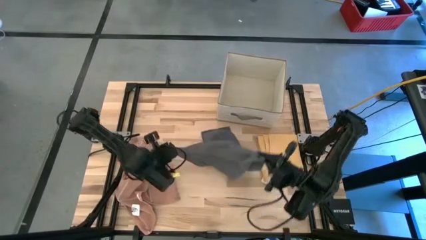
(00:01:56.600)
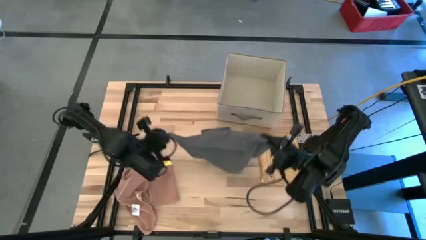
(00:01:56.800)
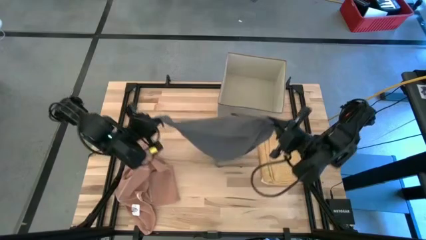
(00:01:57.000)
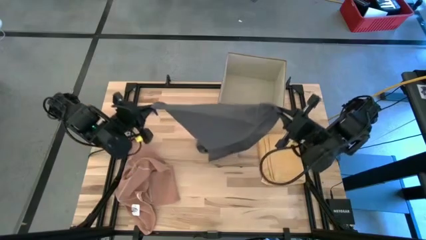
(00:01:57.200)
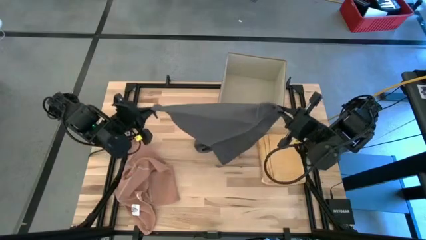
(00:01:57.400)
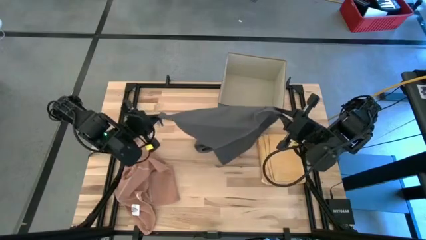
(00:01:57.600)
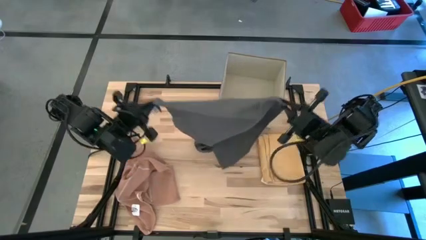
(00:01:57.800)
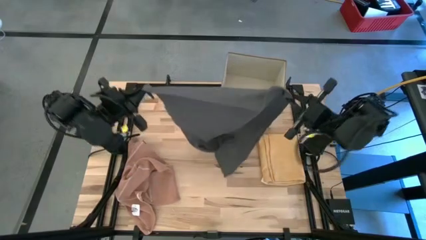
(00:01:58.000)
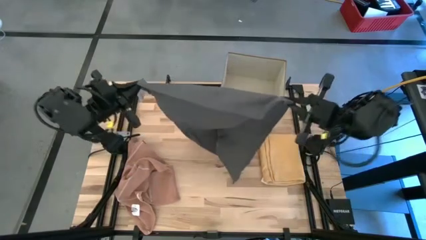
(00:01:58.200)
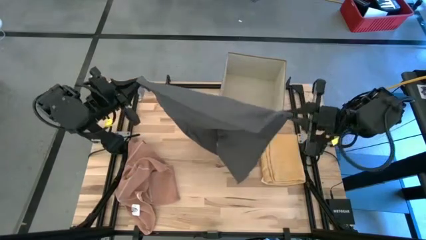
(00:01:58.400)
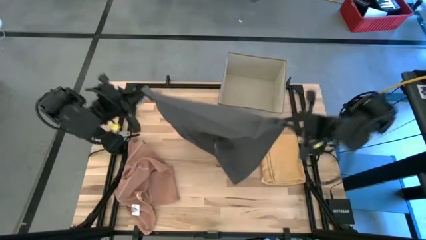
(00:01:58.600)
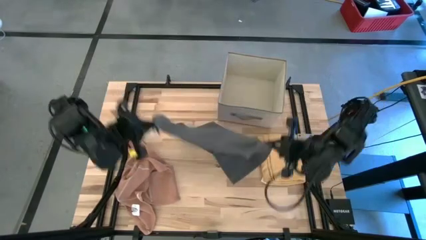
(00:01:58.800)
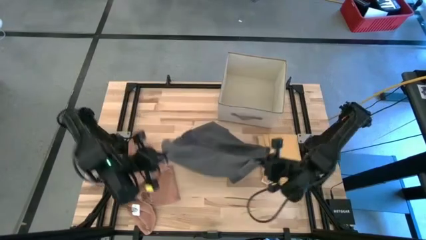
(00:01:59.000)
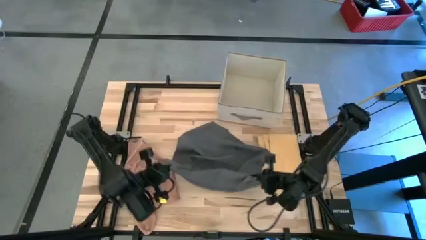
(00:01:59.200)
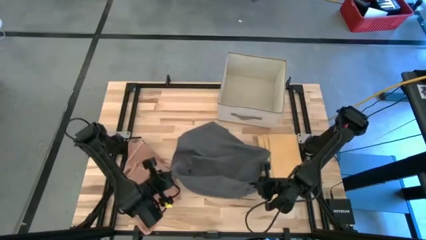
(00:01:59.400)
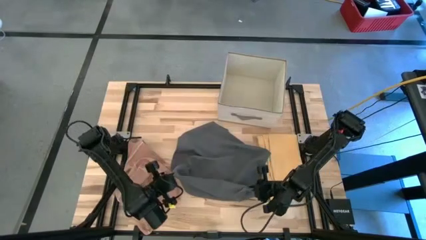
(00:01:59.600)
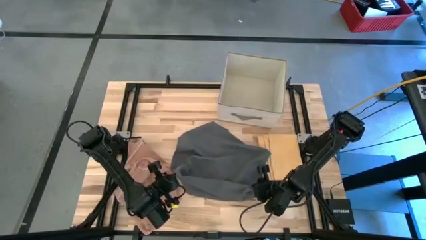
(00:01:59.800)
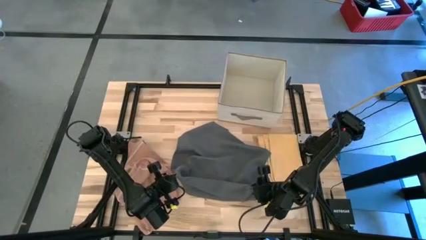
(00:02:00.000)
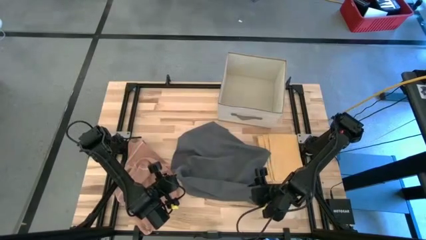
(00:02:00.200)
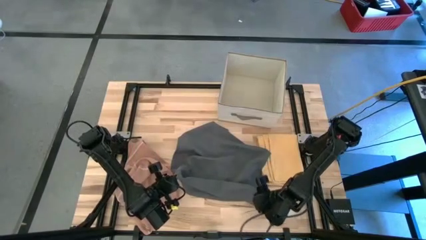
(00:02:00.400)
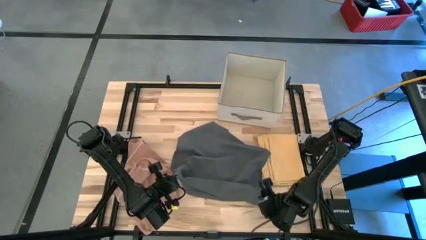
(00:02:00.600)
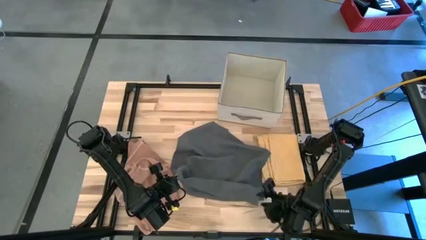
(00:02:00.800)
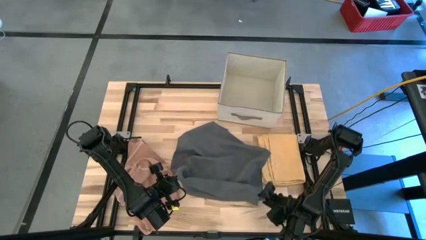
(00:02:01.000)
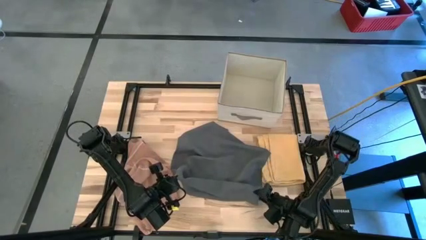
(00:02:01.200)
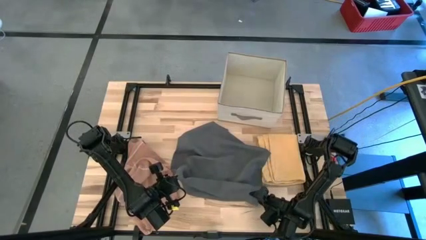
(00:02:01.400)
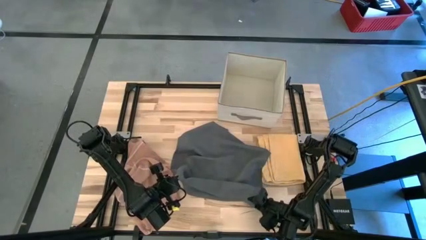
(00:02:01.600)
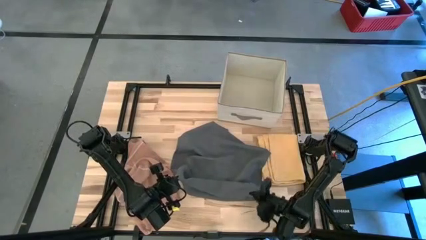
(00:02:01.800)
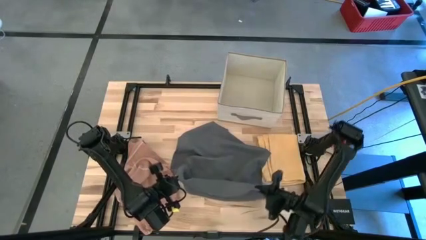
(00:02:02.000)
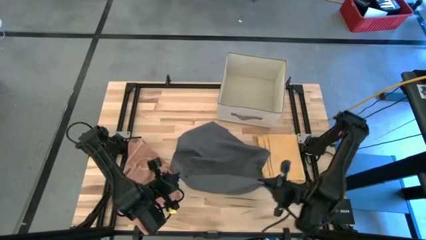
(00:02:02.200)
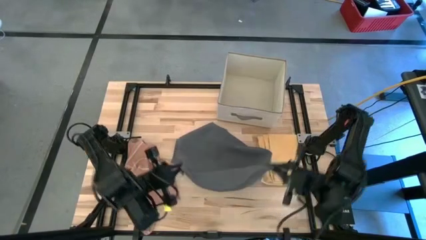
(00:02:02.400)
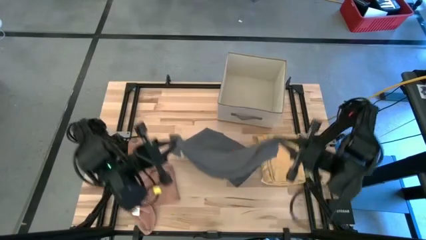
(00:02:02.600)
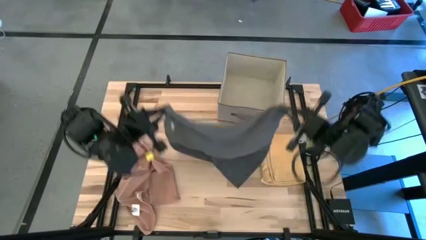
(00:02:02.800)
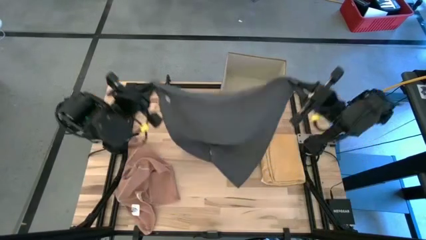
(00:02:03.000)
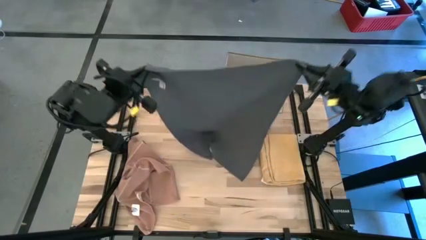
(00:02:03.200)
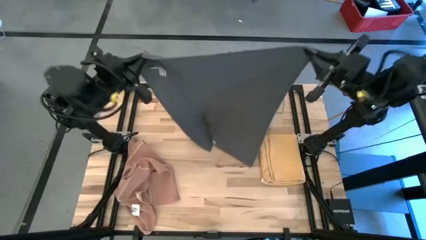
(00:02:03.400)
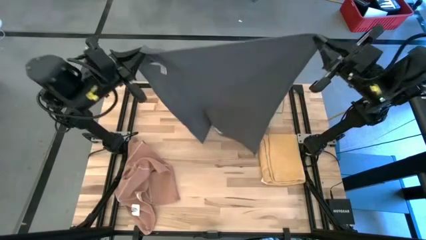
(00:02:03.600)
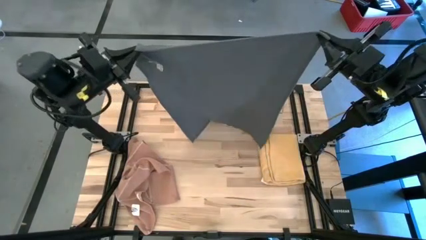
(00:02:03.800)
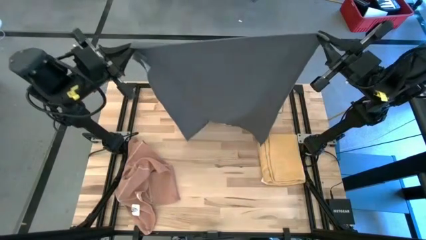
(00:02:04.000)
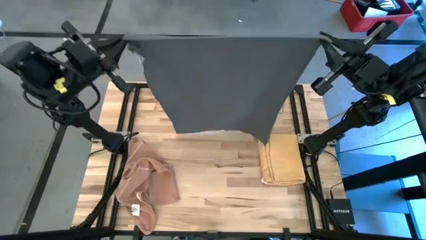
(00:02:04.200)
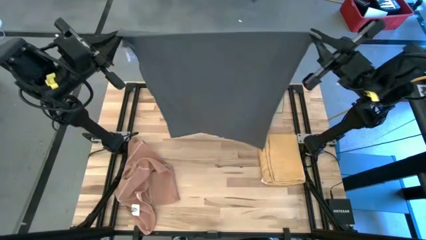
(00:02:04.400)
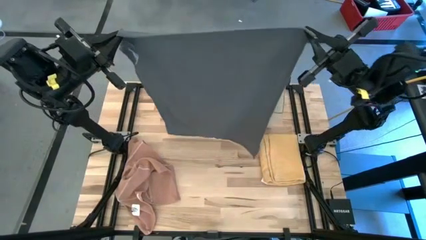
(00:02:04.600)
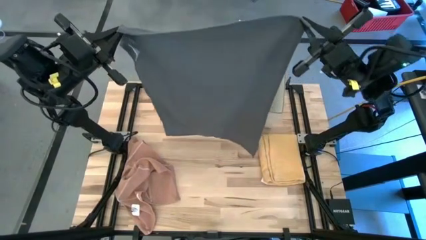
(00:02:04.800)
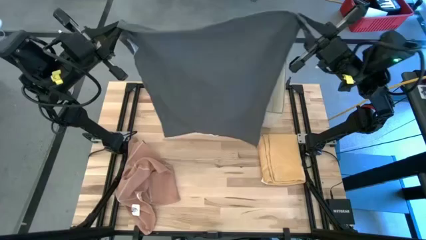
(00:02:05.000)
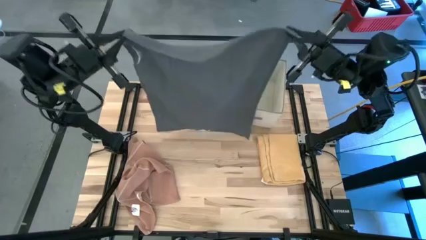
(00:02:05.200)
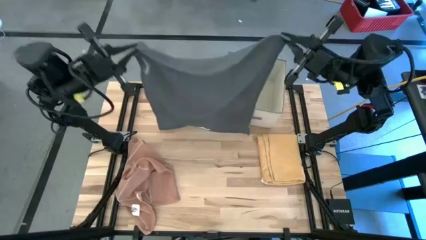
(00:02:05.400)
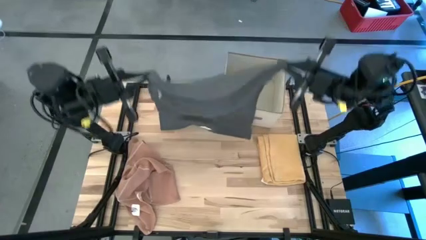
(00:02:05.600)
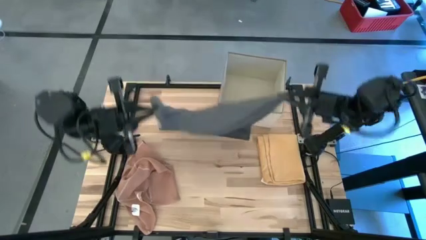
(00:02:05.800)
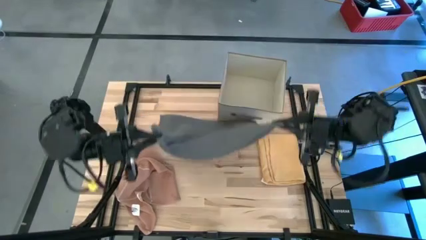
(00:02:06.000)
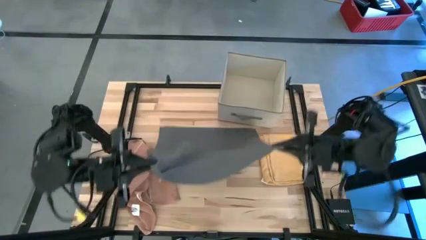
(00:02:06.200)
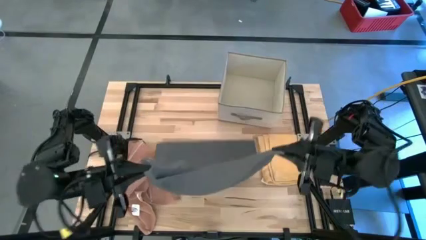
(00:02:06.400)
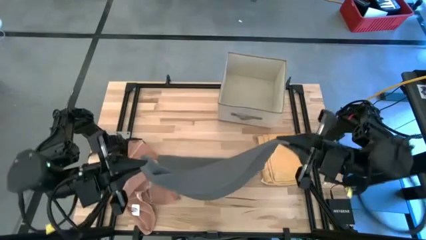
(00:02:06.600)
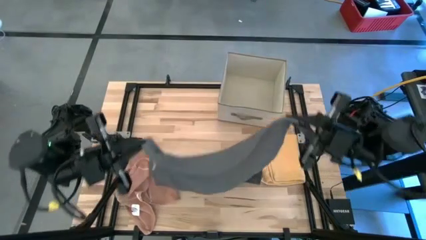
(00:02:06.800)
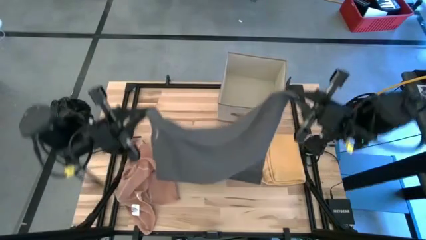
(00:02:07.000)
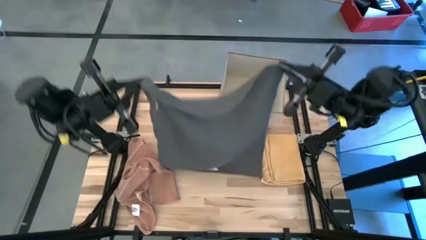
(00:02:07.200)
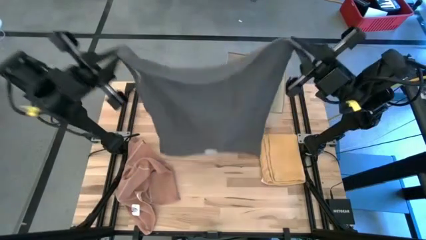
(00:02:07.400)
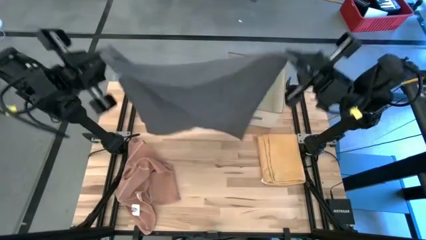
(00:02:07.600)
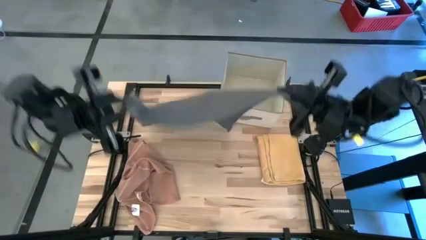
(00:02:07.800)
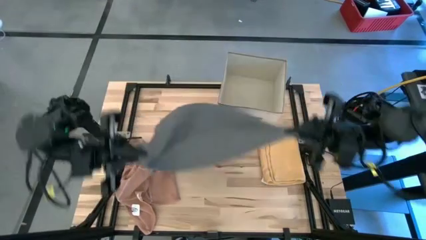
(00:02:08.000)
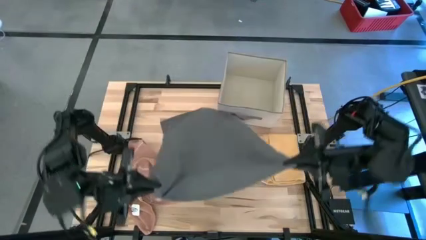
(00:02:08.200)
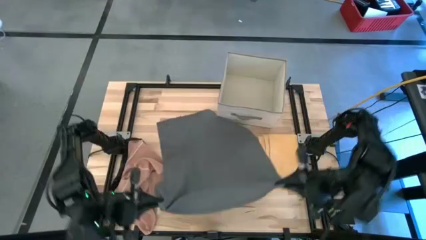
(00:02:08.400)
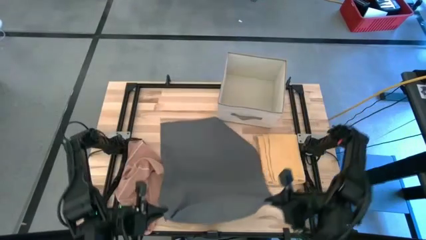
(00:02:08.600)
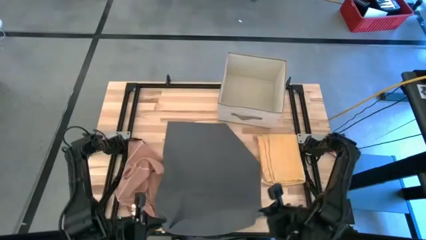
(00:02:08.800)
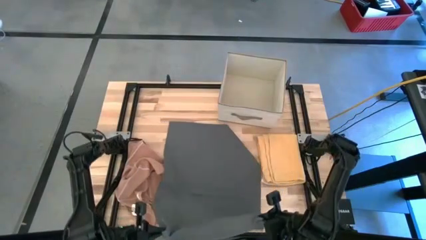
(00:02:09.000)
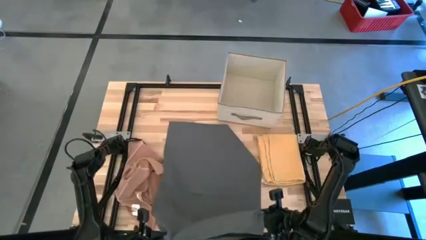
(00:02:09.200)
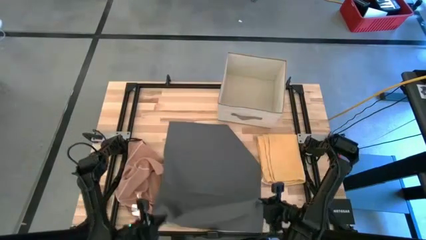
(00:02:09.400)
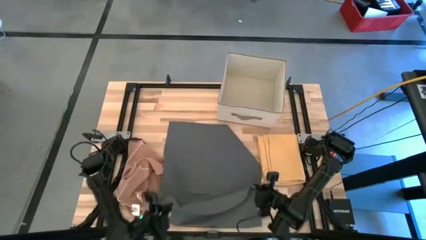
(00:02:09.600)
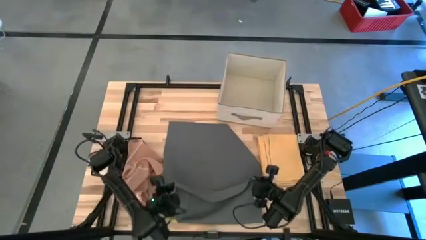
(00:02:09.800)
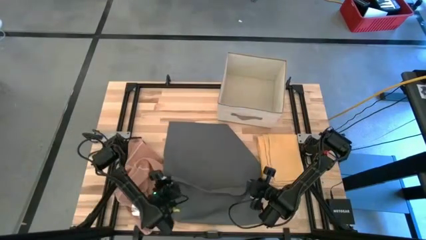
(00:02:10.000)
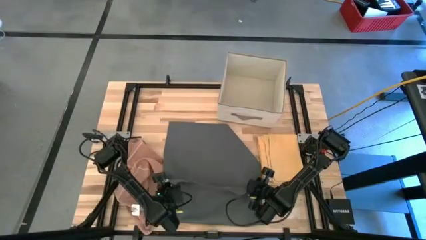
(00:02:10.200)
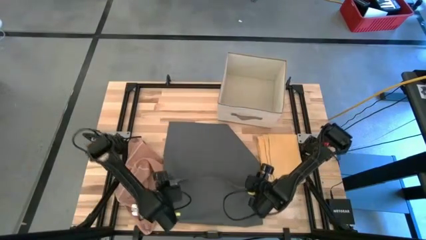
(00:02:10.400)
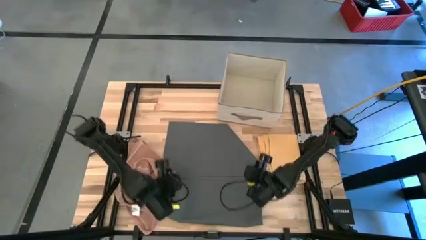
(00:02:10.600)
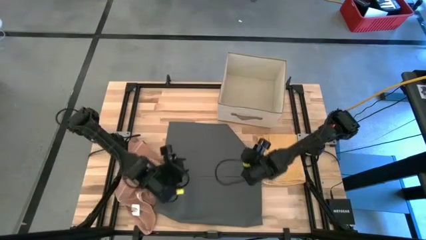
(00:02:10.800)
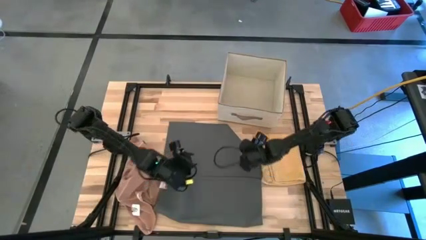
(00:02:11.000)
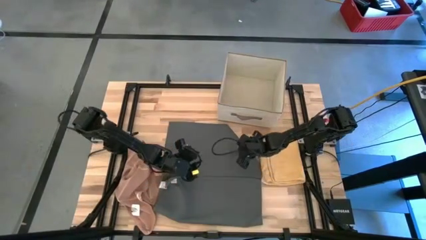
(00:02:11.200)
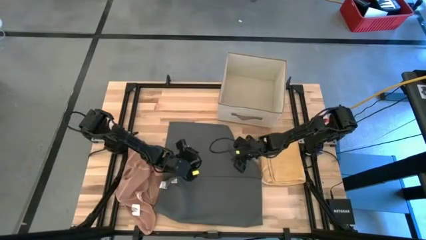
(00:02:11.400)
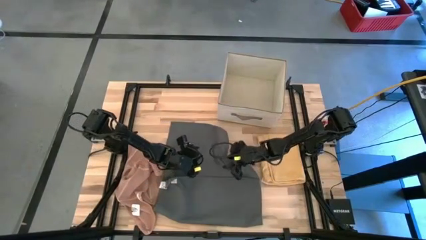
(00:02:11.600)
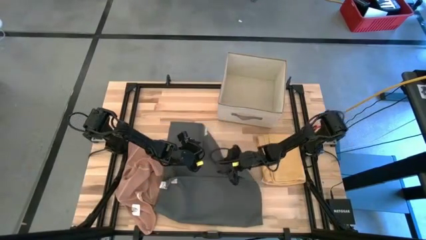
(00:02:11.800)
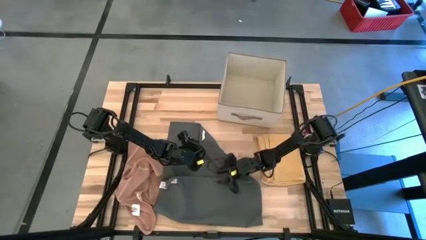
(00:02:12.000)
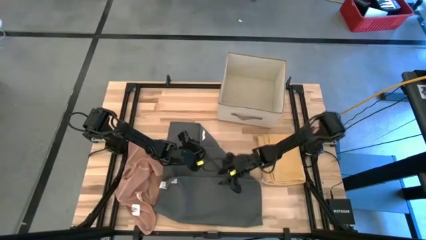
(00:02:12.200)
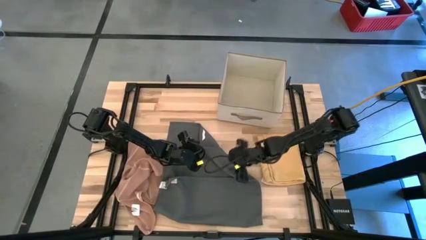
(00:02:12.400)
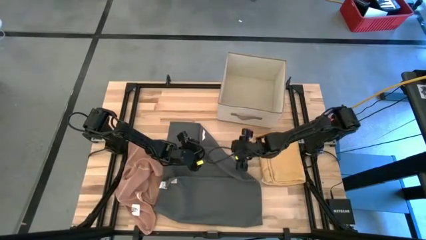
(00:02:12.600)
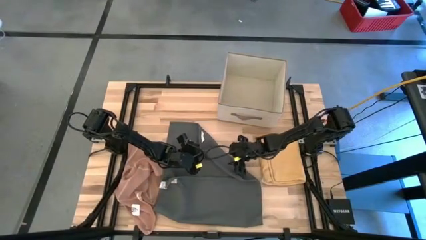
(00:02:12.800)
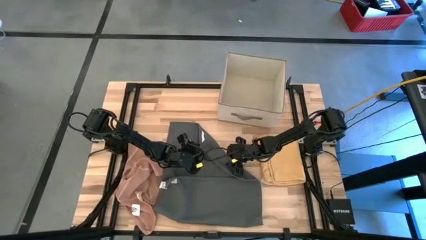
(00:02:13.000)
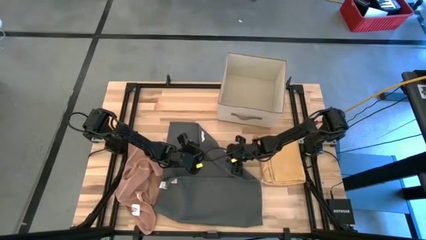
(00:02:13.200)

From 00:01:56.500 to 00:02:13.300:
Task: Fold towel
Fold the gray towel
